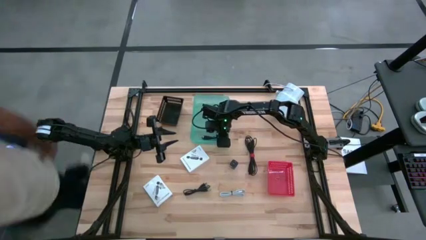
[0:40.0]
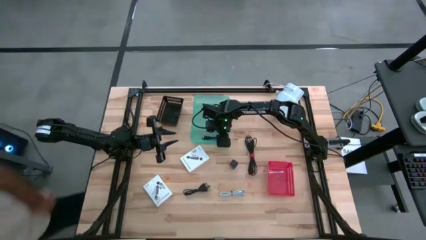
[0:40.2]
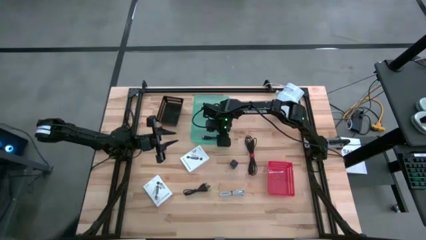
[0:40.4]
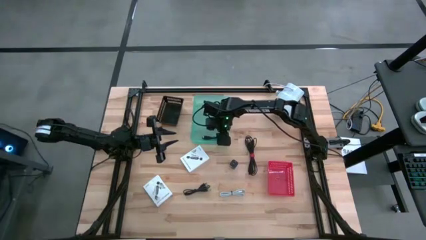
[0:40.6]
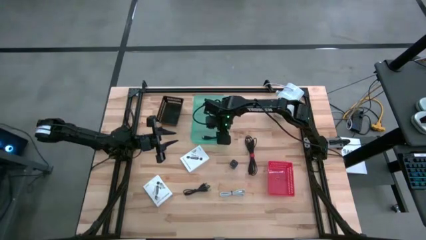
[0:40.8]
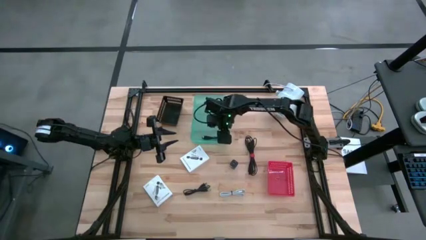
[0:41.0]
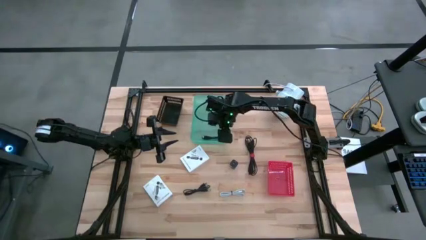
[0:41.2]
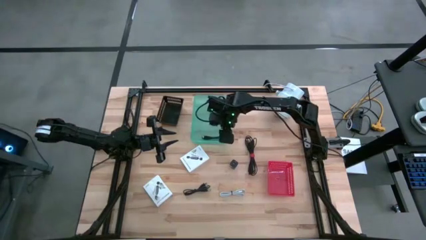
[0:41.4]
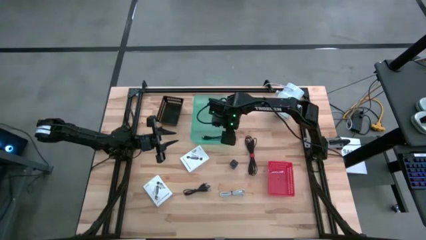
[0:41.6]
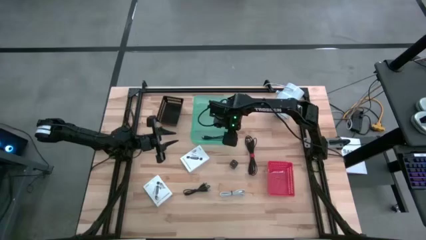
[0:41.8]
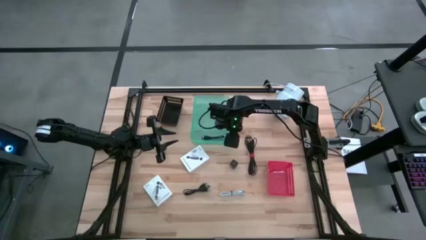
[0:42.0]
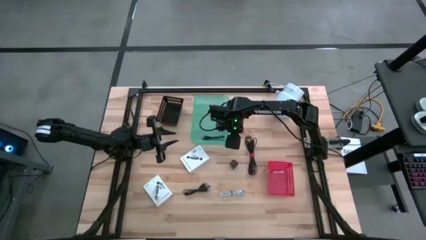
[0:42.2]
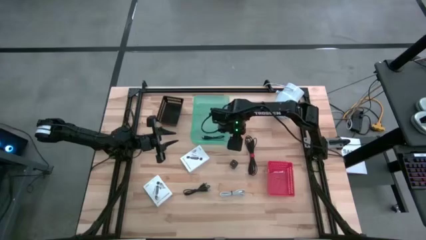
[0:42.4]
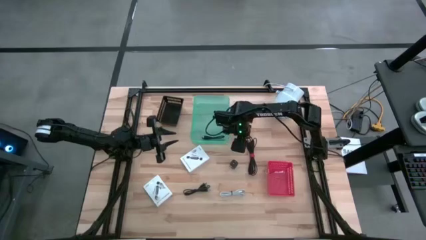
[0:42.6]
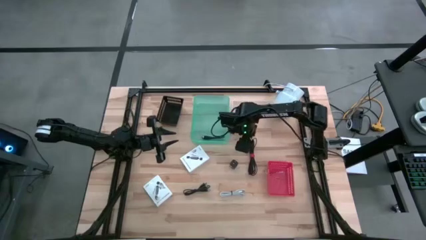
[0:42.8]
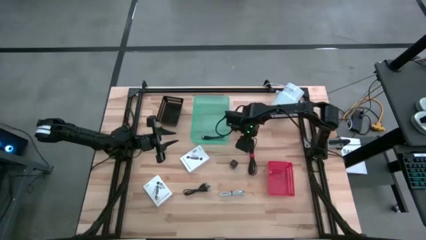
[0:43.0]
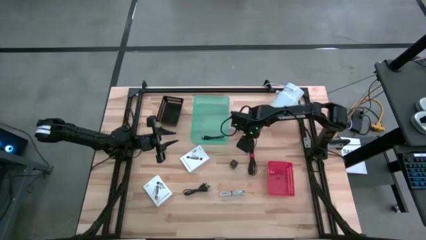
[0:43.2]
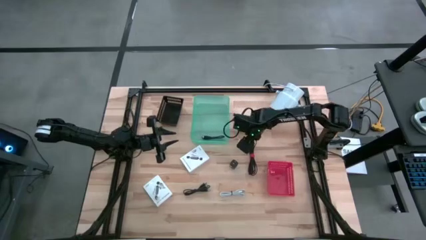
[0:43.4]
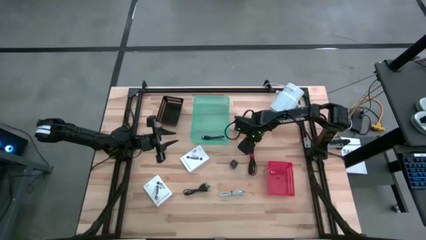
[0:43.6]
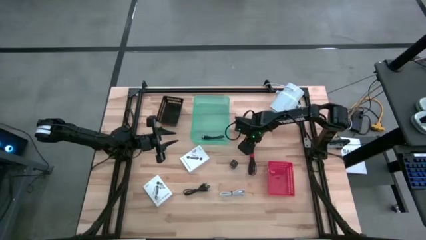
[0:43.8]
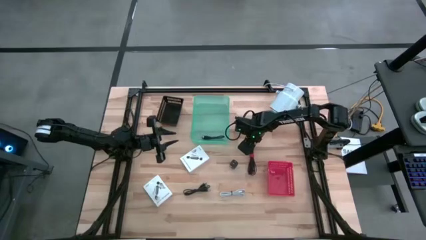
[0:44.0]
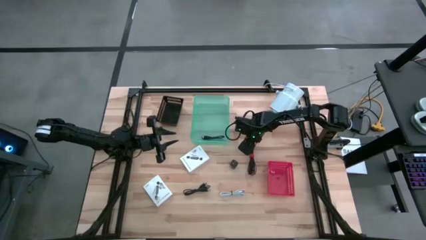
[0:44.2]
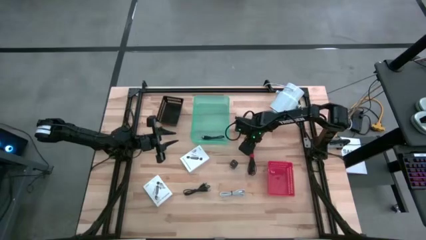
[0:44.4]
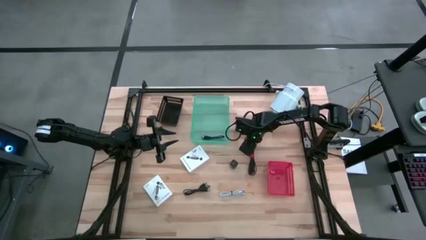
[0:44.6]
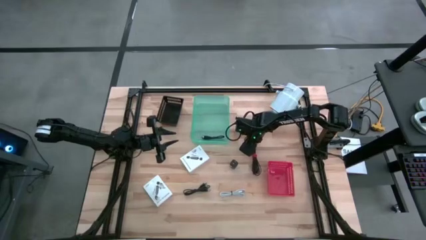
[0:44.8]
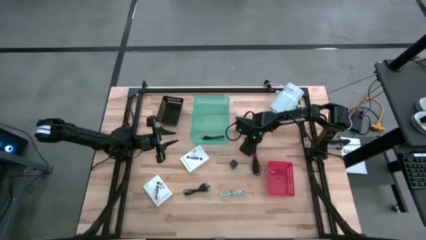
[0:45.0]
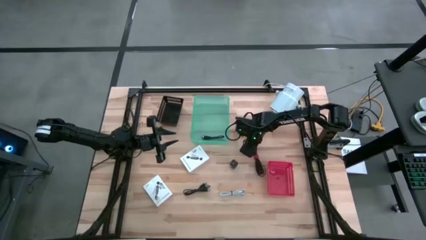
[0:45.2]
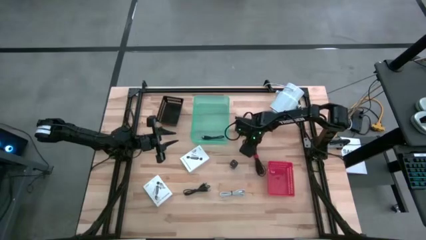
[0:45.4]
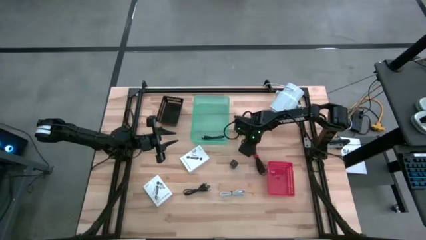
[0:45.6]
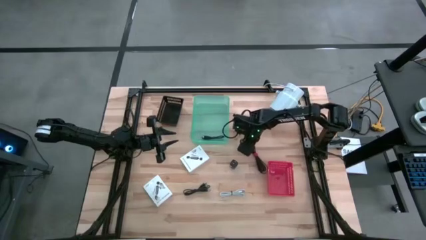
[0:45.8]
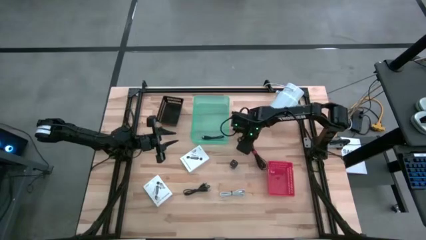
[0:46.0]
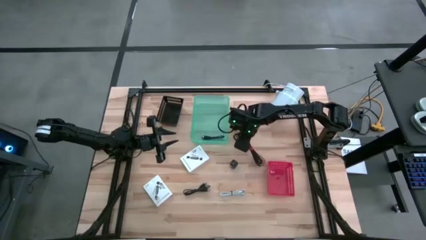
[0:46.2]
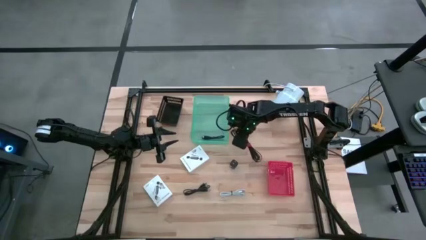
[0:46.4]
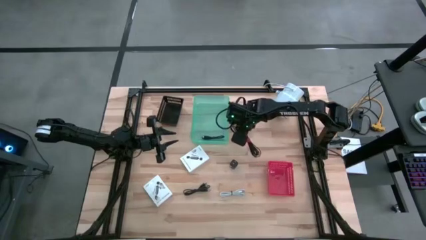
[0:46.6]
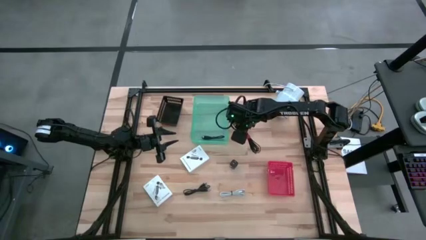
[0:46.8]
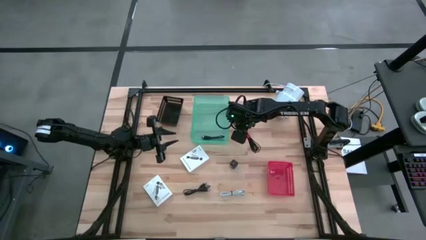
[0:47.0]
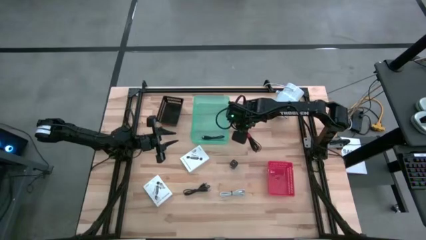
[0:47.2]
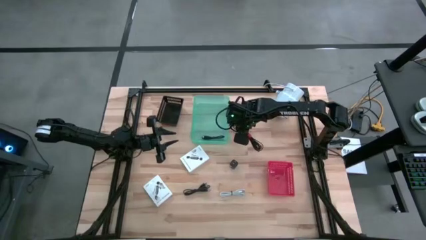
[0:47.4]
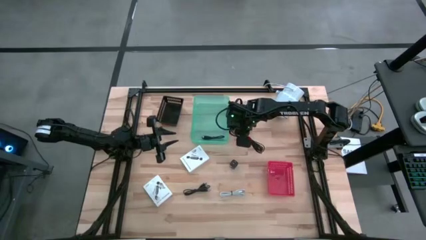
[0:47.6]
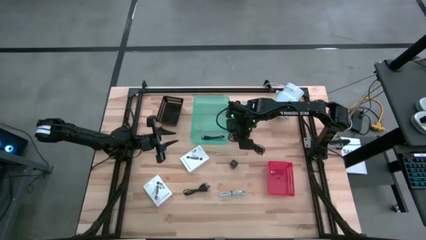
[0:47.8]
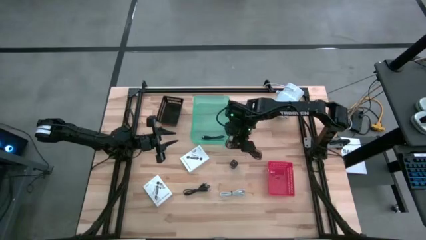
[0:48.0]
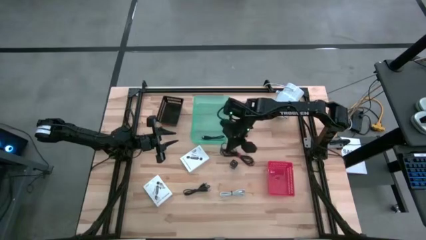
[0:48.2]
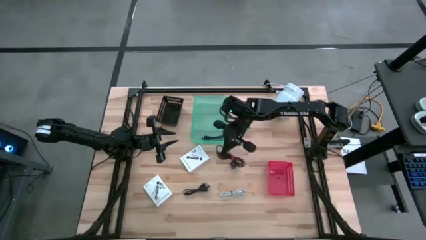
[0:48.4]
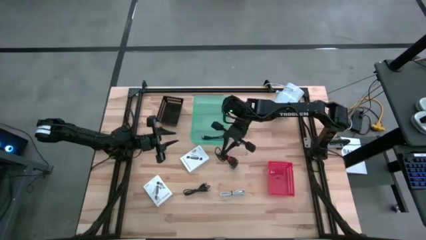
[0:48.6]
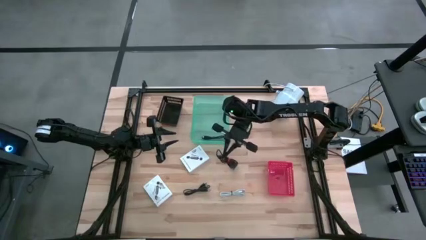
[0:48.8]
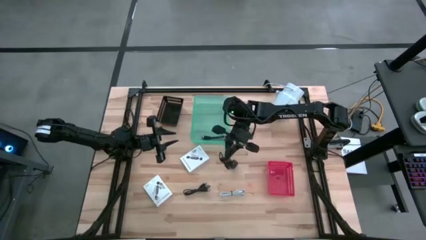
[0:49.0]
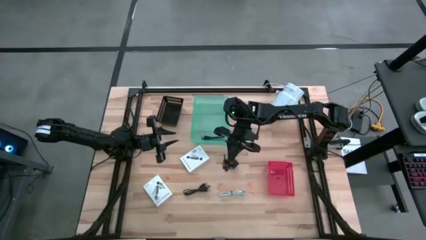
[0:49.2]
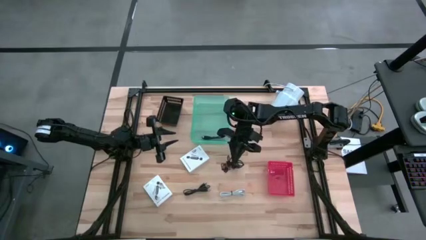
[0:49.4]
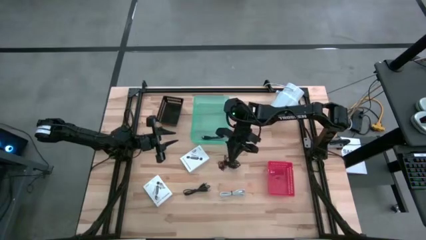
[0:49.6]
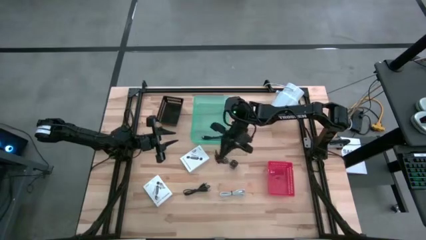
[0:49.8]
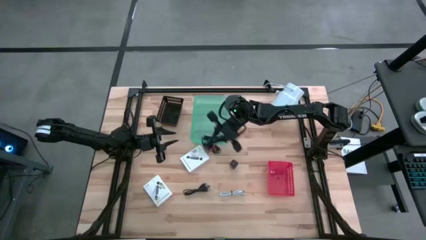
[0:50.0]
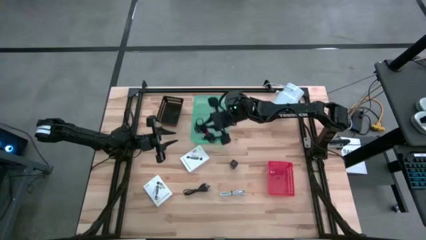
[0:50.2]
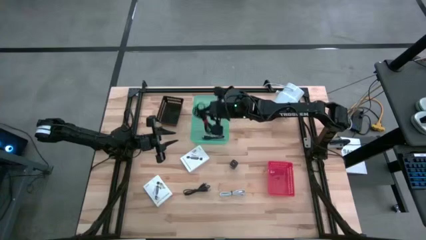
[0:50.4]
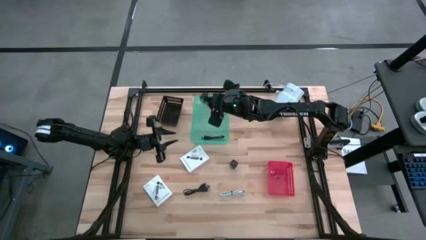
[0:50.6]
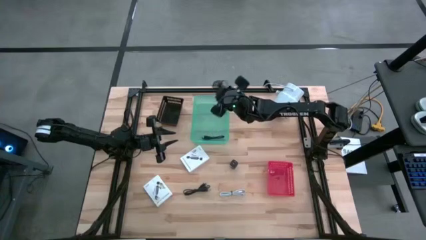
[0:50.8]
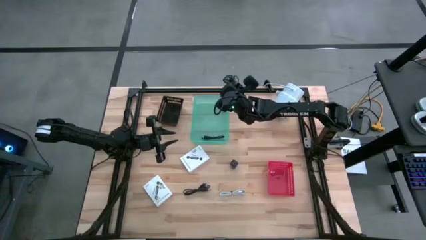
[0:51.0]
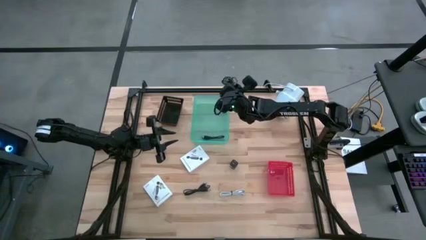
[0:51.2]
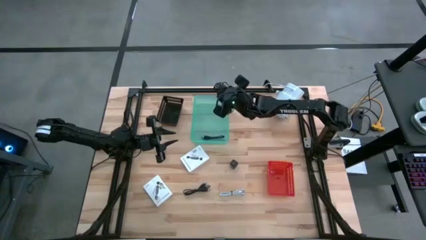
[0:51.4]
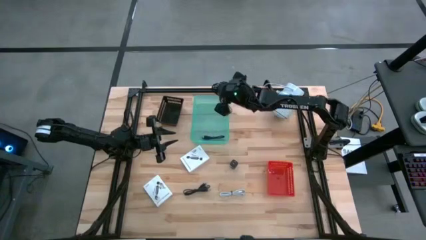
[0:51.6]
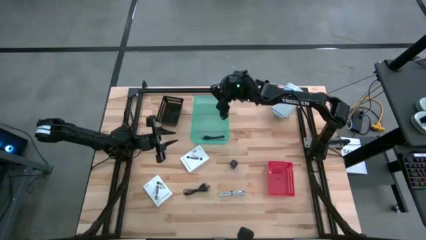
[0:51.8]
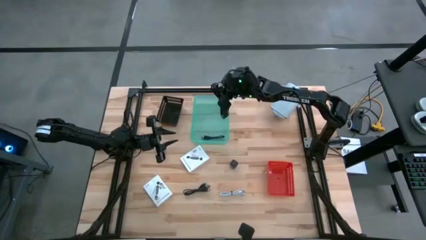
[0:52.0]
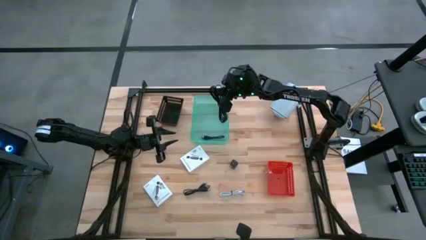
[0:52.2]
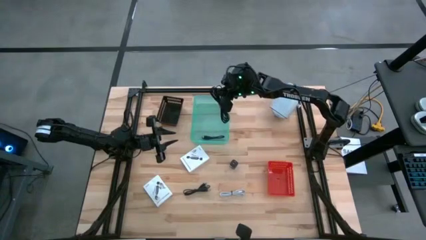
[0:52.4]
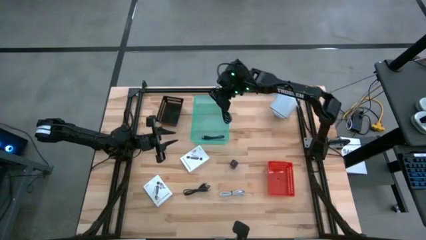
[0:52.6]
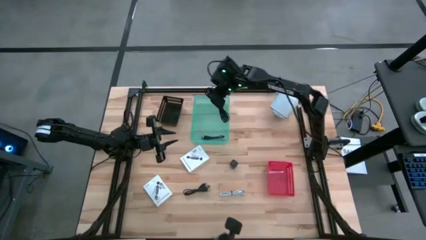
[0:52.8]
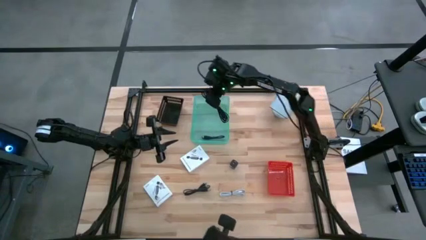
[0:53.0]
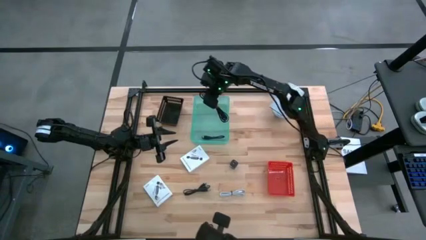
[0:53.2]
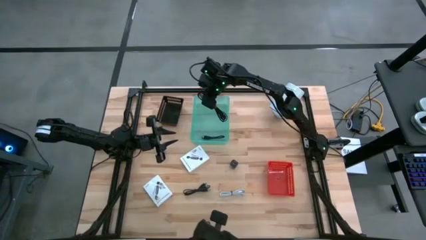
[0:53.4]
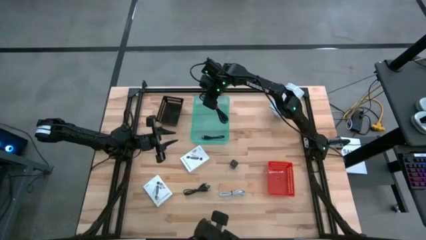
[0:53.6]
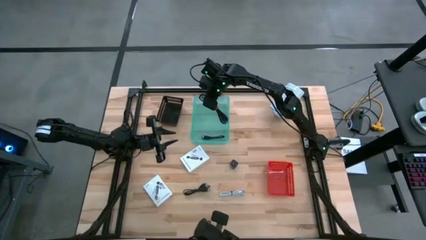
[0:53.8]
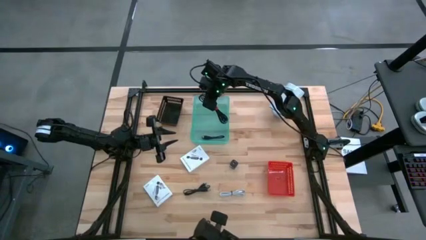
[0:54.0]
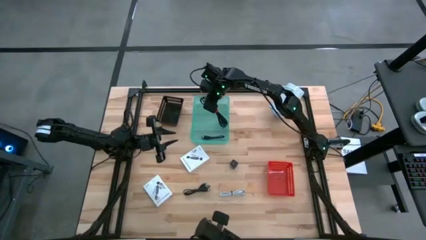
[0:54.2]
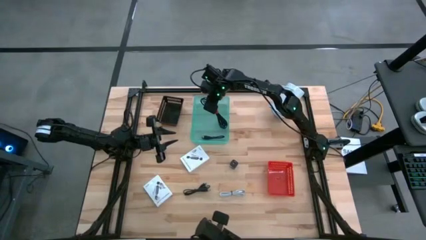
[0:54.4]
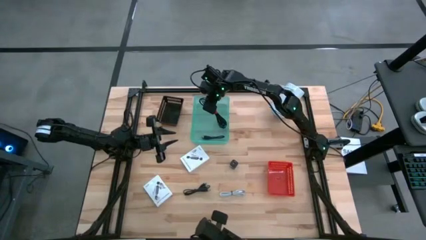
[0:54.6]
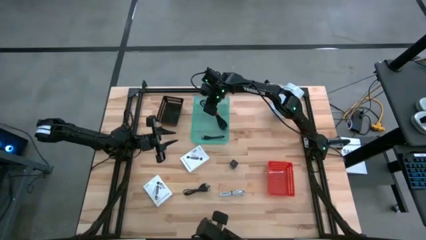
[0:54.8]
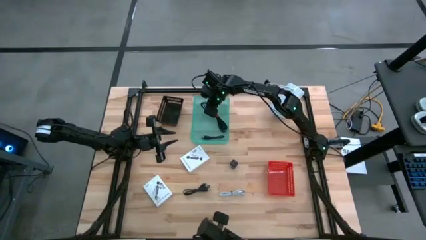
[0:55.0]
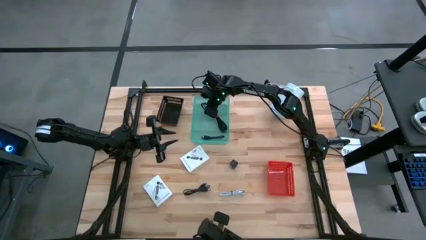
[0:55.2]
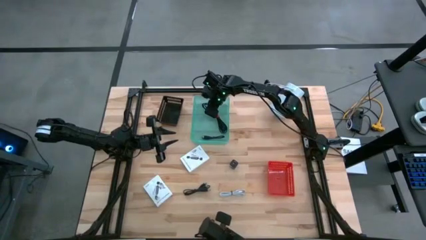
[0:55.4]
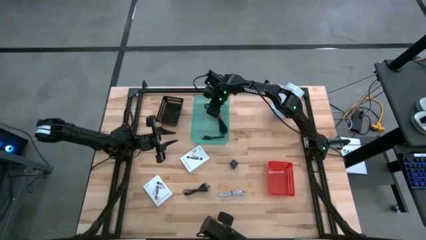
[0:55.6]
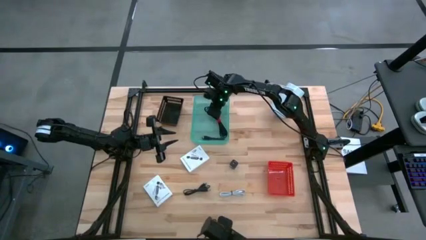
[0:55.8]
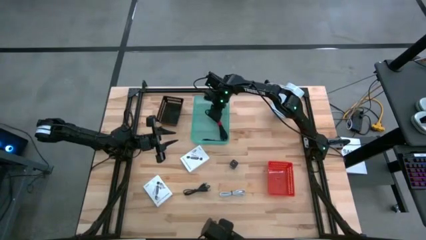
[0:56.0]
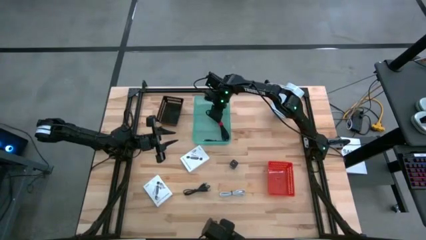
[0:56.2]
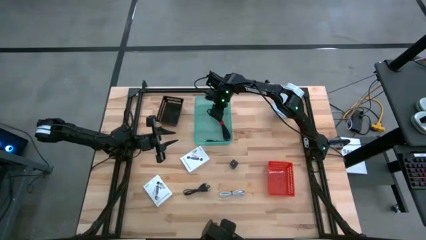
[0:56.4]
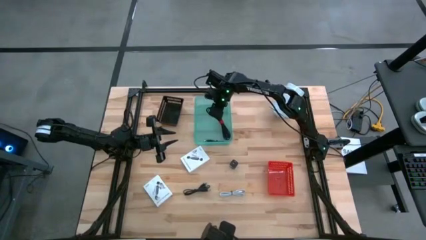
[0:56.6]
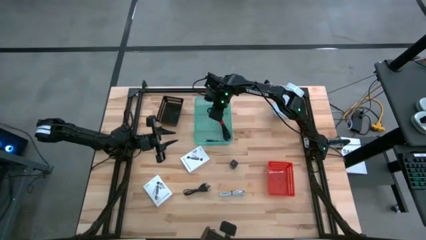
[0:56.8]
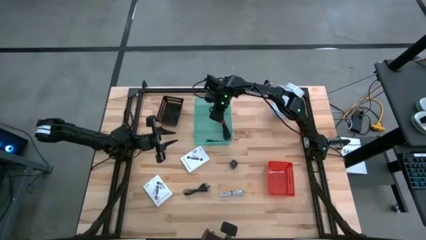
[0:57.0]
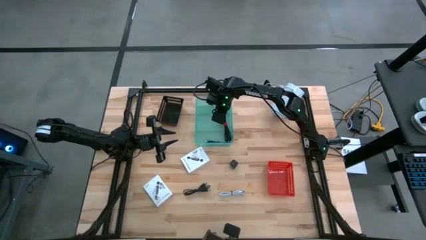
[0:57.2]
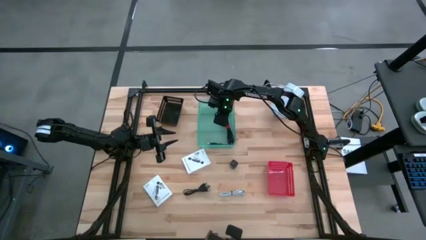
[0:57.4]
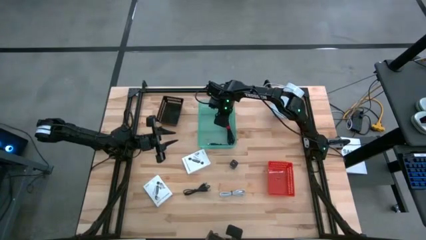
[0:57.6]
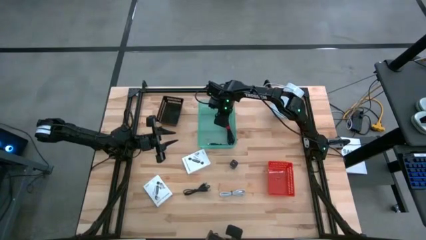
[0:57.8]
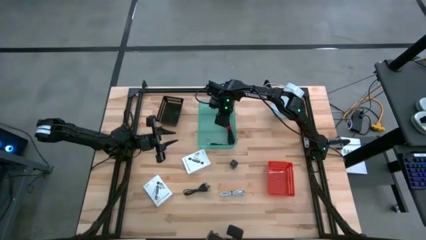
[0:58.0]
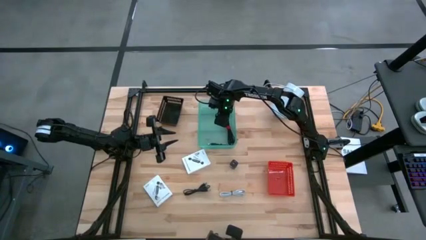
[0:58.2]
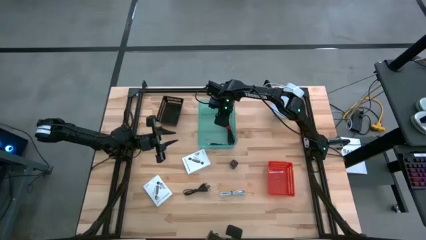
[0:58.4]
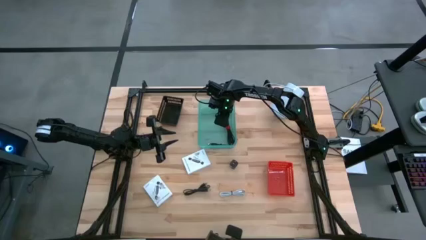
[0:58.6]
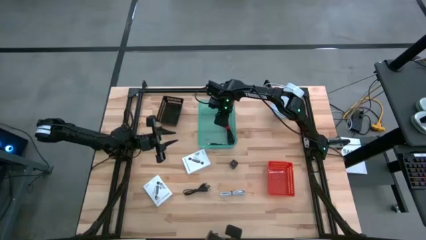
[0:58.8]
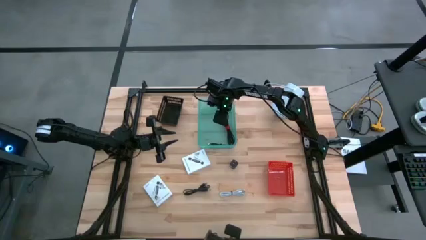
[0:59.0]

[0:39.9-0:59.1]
Task: Pick and place items into bin
Put the top black charger cable into the green bin
